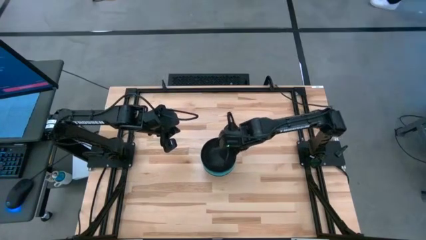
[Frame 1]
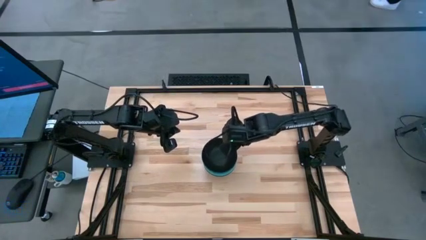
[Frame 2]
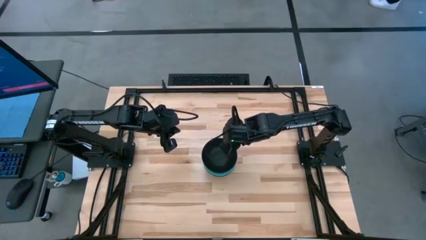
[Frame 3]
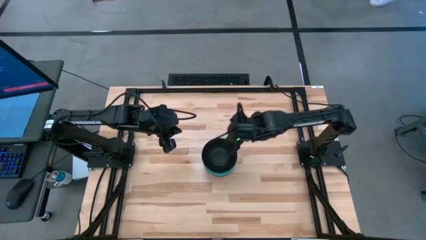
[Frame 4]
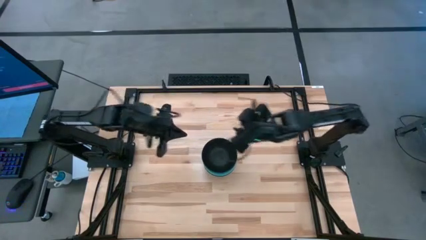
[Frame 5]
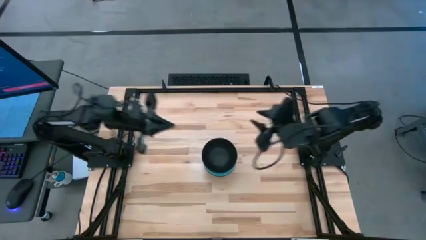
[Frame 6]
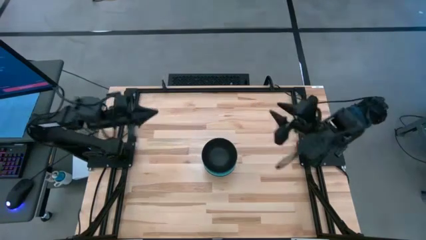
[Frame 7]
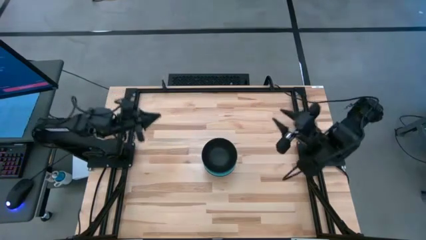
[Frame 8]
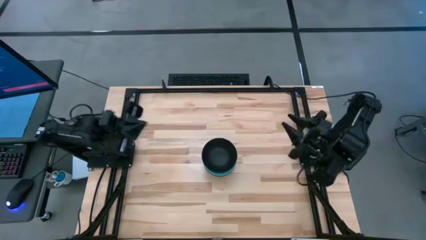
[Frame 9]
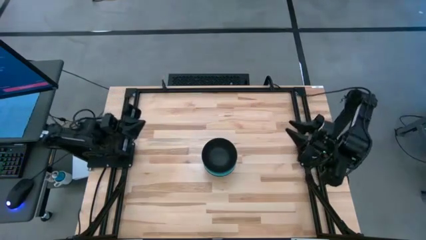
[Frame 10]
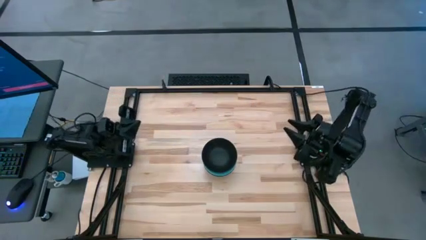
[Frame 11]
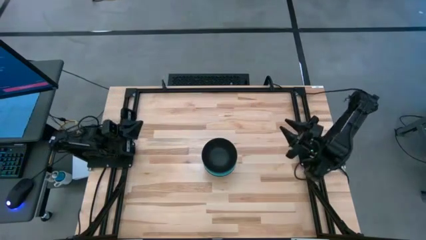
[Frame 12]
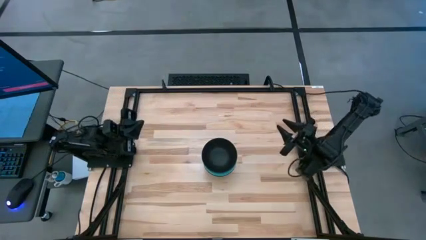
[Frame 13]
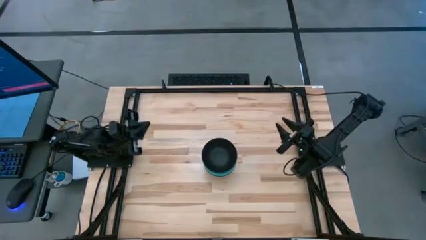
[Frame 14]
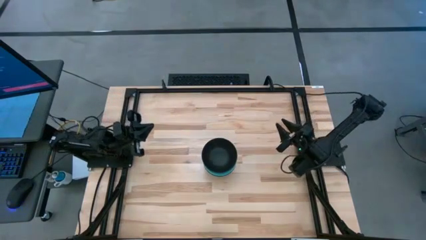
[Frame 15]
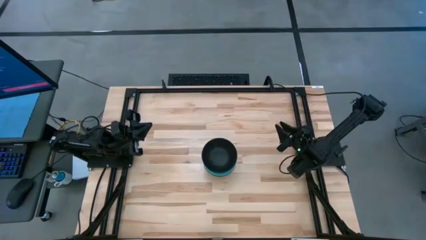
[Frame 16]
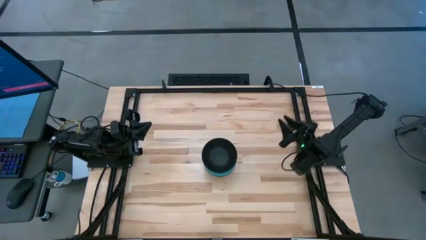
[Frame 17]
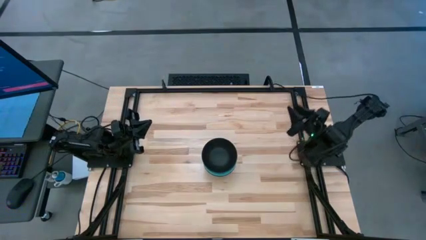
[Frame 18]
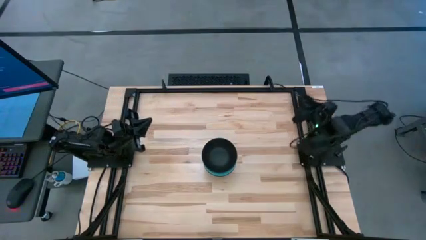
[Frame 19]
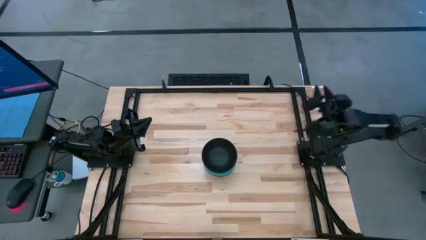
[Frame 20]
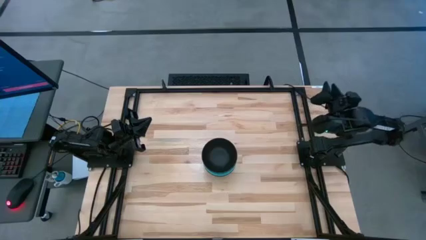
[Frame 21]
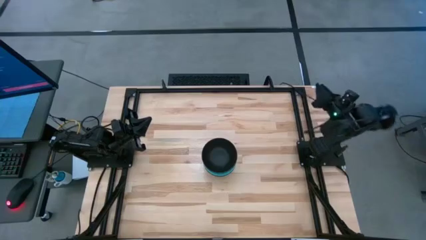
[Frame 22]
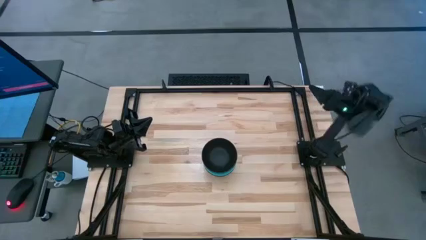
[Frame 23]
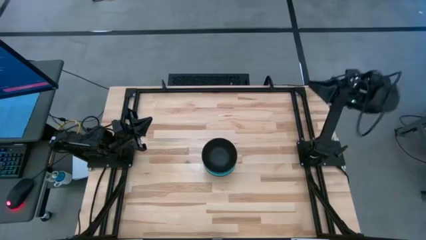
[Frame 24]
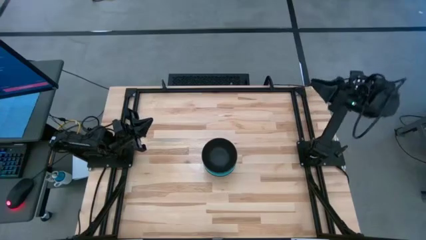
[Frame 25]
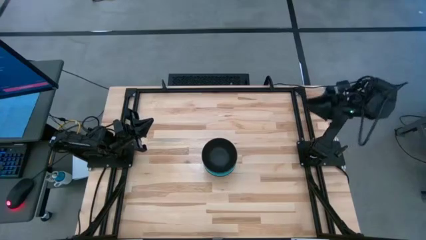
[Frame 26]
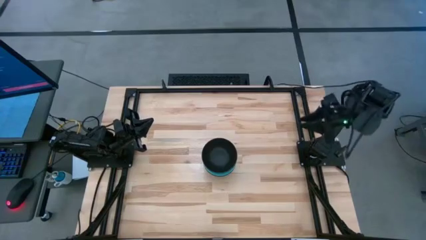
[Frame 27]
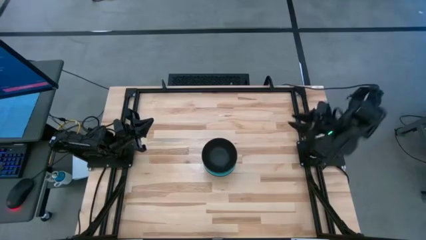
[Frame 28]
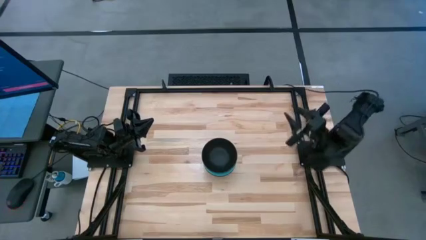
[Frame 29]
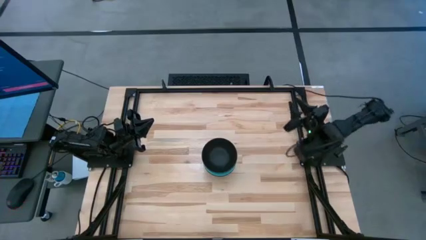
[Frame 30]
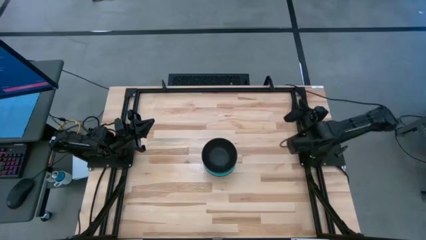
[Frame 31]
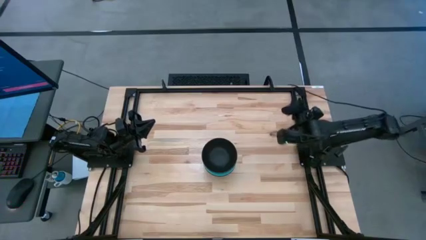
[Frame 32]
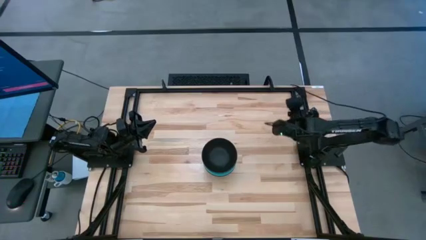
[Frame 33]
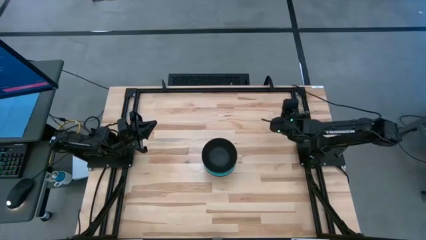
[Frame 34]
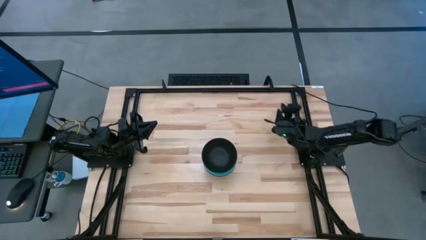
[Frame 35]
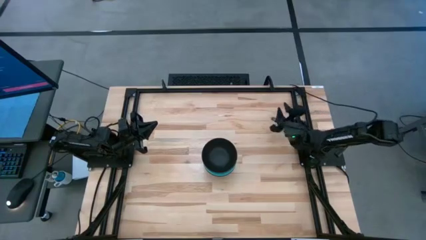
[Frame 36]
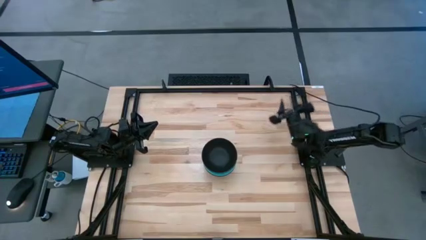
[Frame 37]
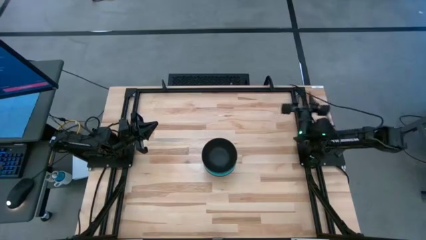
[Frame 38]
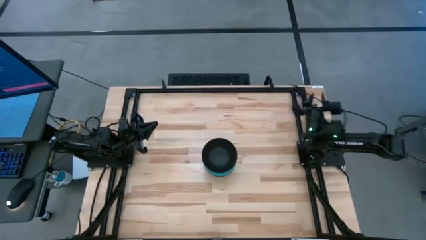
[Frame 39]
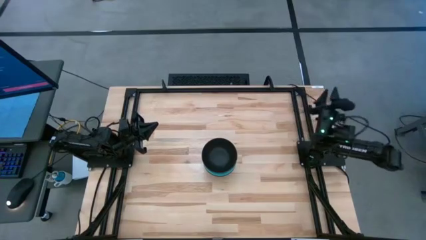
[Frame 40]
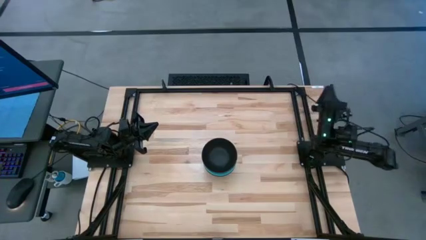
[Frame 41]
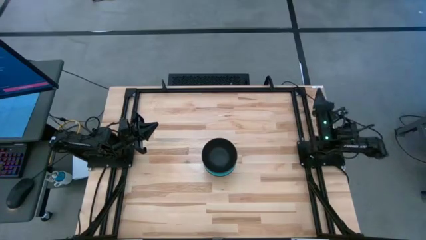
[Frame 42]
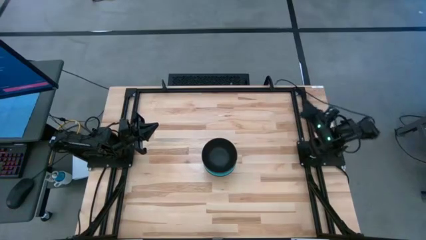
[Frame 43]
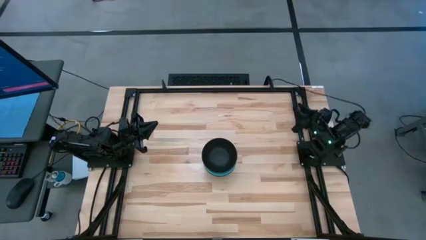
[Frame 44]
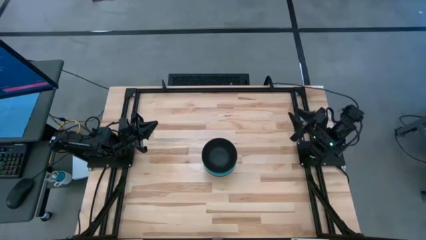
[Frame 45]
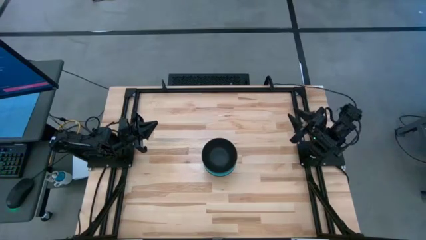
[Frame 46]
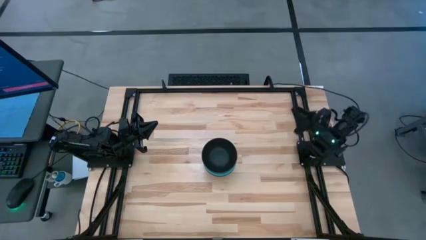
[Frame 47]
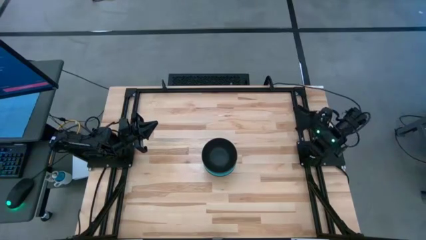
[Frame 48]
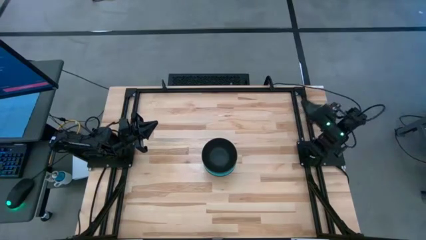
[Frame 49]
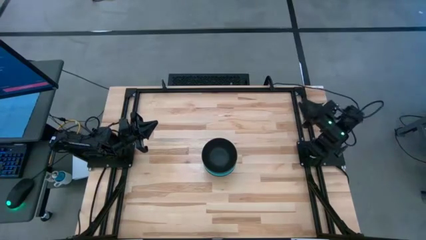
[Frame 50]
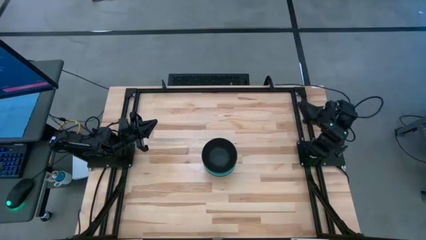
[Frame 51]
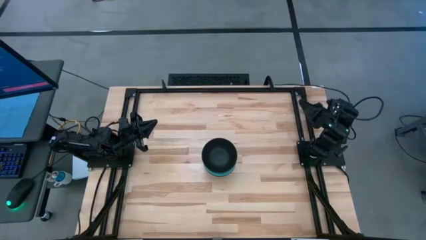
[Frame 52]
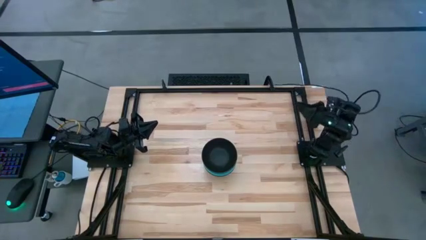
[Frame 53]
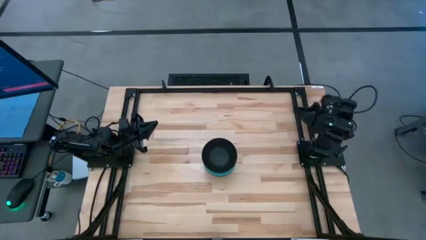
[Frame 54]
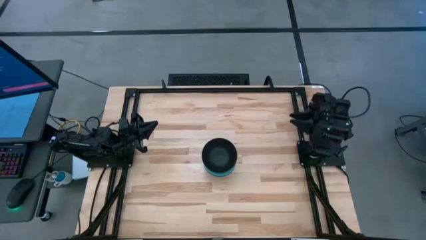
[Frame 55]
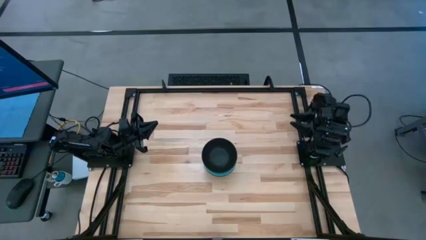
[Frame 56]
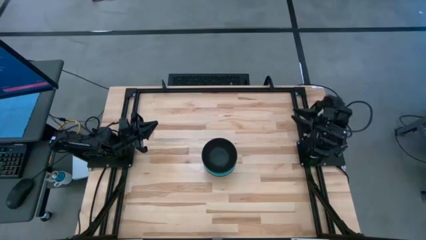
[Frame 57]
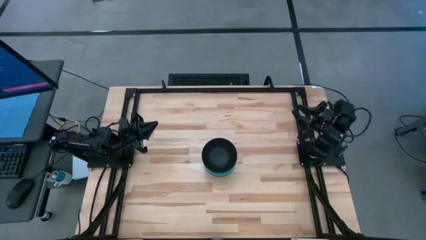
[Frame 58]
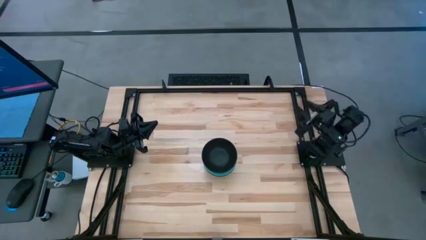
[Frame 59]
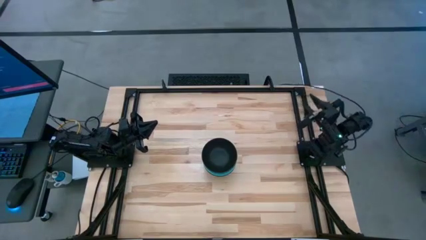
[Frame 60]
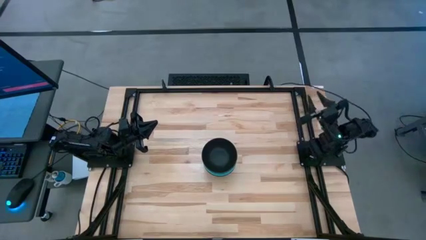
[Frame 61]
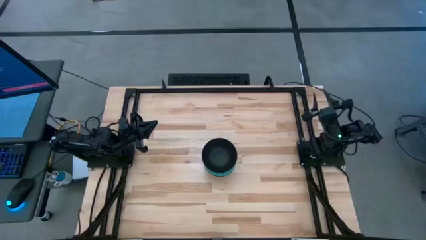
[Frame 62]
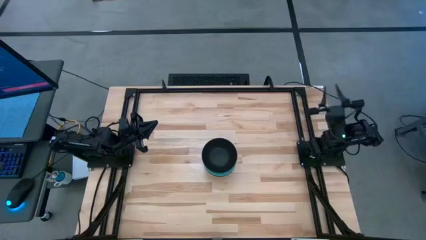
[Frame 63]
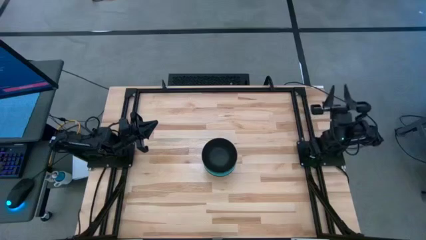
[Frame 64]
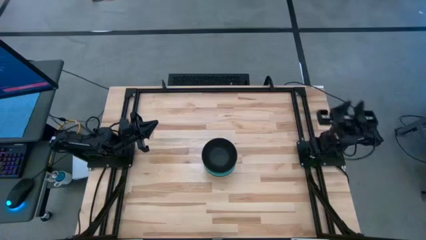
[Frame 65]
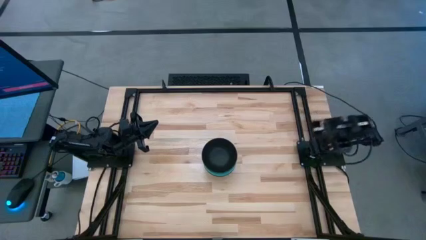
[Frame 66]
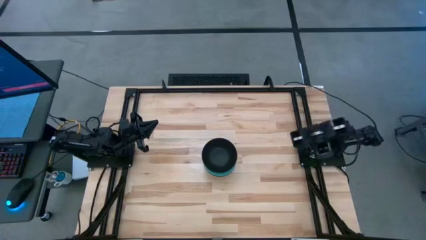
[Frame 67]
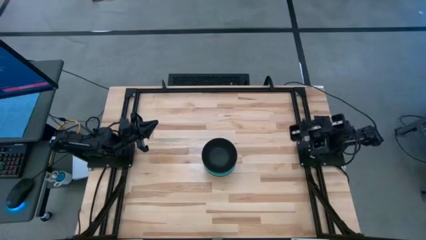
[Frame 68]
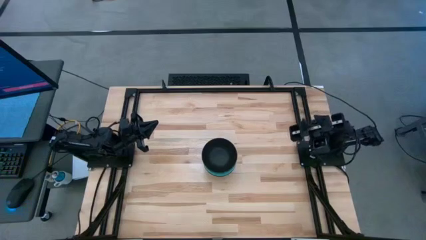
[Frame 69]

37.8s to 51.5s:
Task: Nest bowls inside each other
Return to Home Position

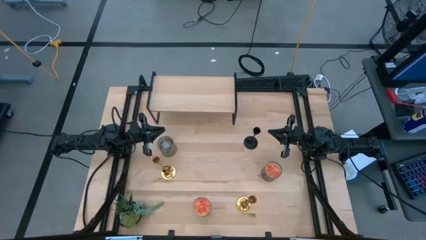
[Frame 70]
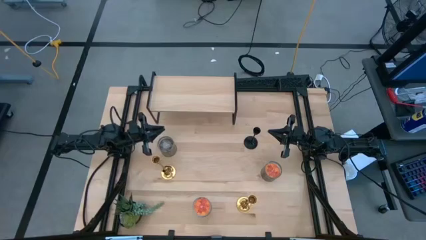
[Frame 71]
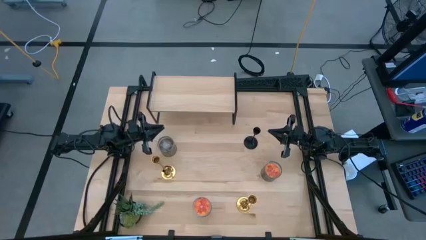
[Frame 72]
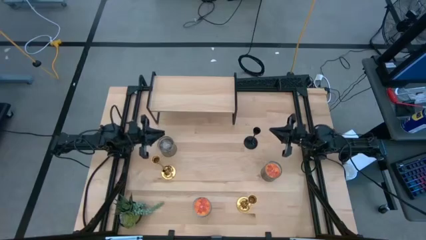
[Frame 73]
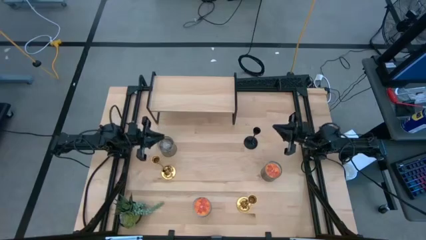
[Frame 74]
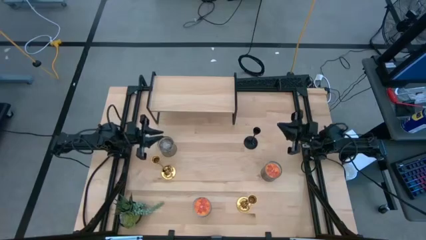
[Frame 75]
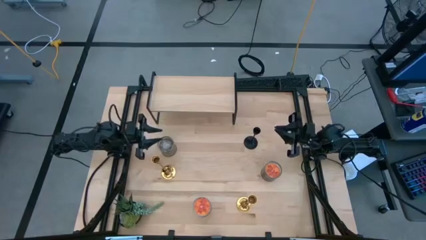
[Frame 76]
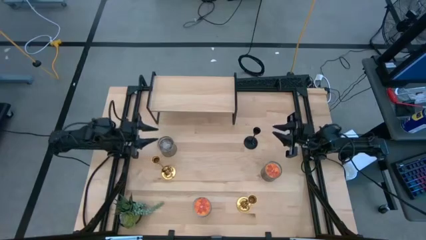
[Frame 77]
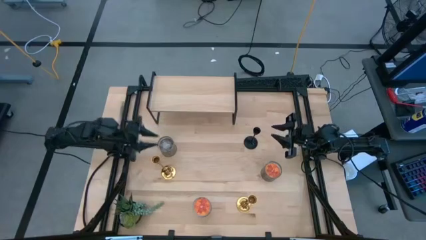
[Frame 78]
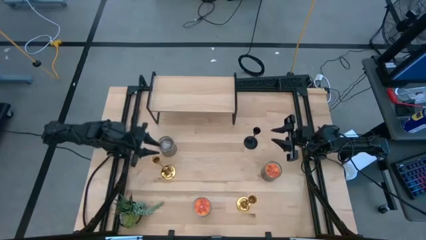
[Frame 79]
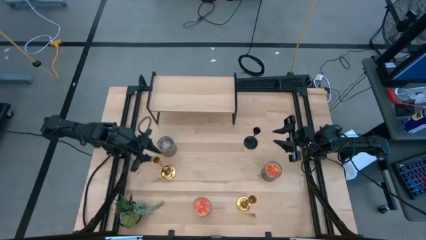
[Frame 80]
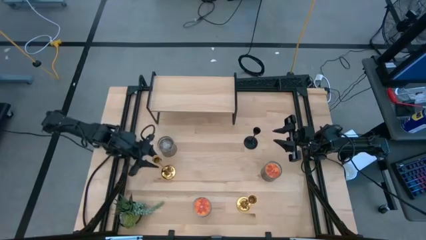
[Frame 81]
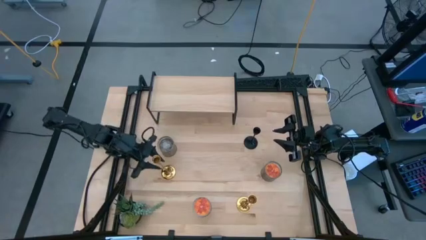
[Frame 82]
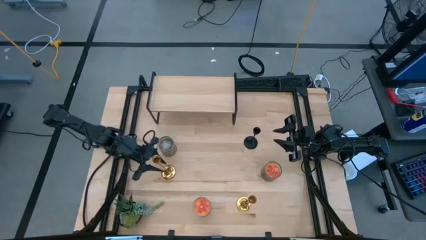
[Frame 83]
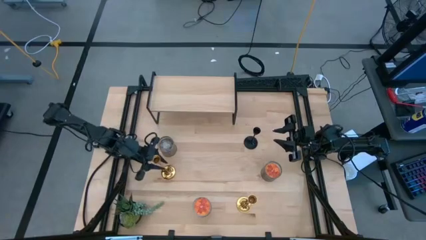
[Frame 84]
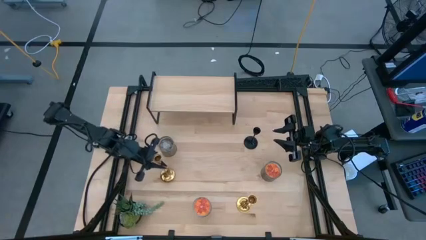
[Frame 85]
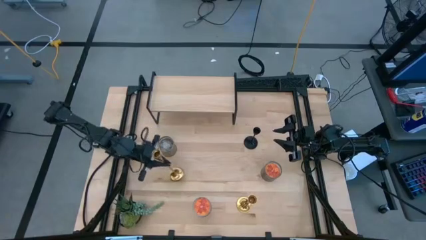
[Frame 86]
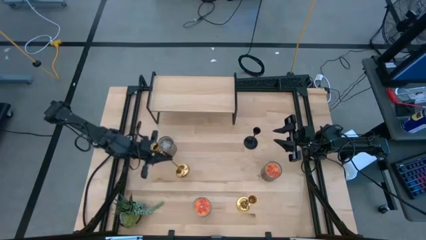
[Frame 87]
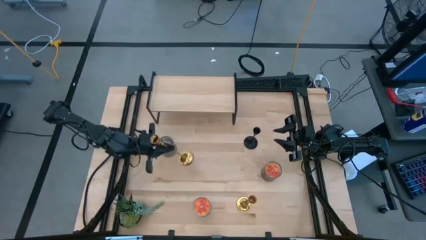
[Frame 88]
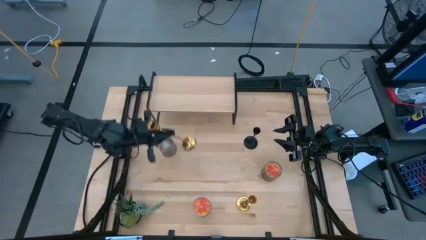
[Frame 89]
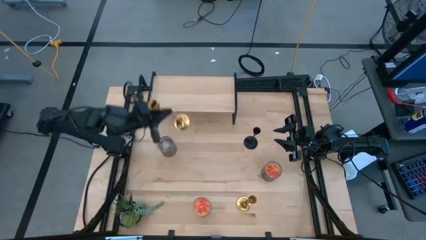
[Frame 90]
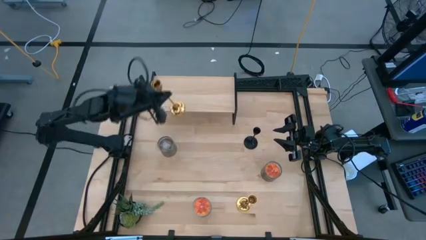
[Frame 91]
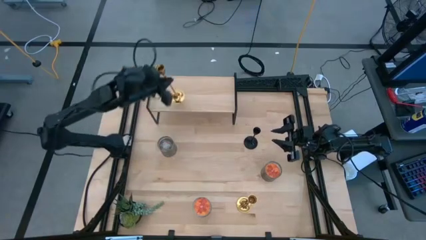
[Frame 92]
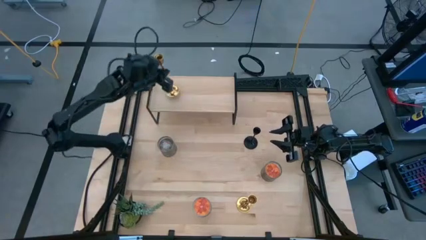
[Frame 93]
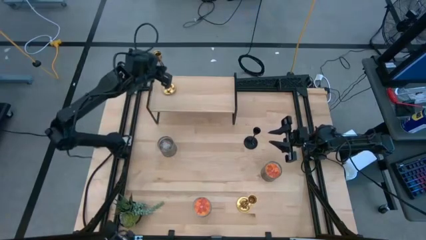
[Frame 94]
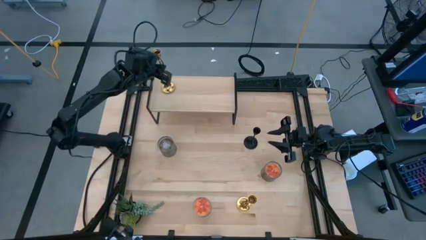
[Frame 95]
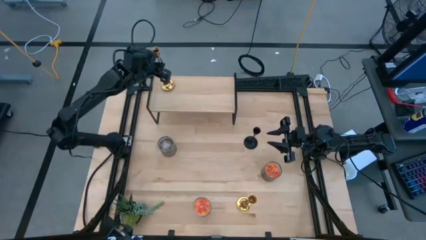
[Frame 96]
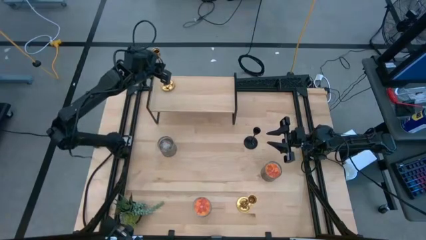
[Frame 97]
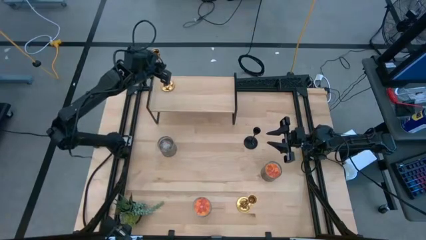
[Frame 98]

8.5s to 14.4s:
Task: Pick & Place candle stick holders
Put the left gold candle holder on the shelf
